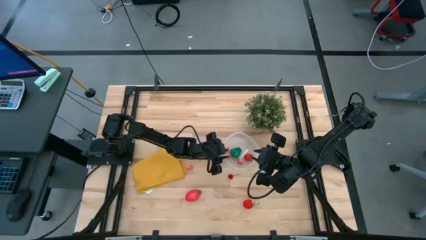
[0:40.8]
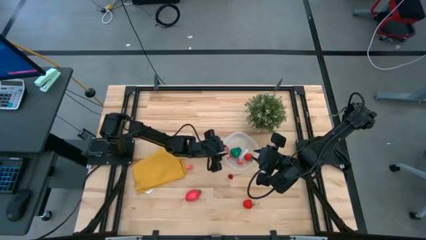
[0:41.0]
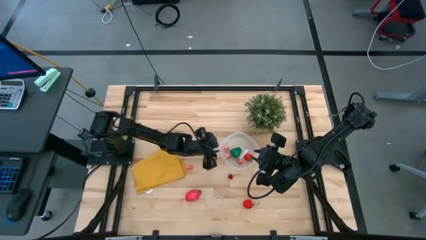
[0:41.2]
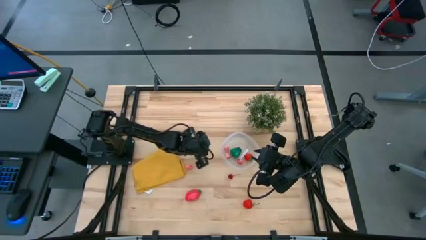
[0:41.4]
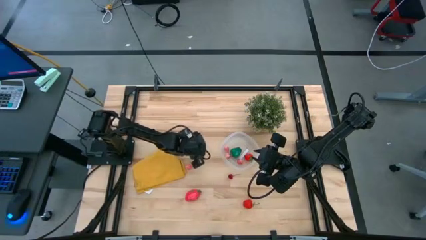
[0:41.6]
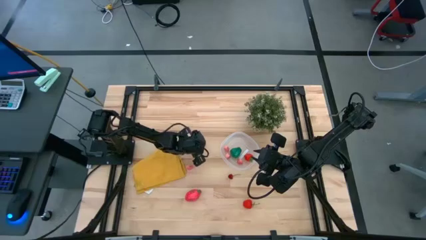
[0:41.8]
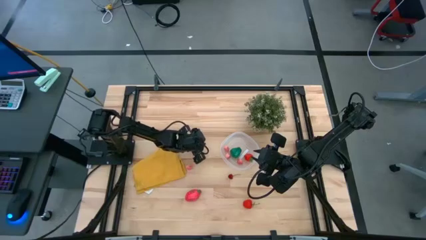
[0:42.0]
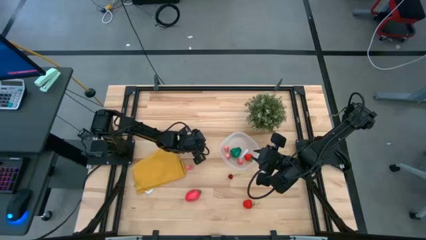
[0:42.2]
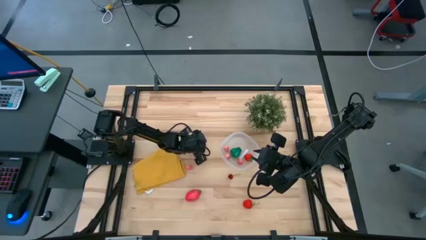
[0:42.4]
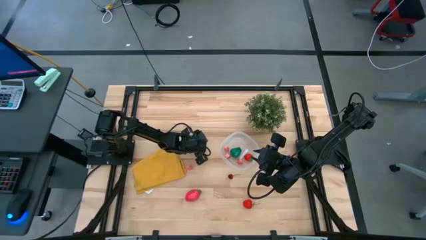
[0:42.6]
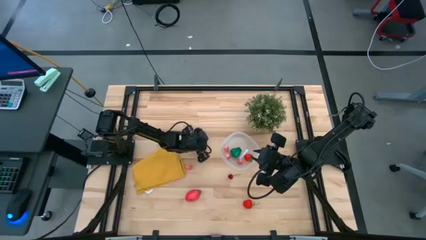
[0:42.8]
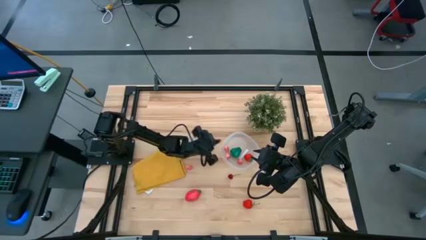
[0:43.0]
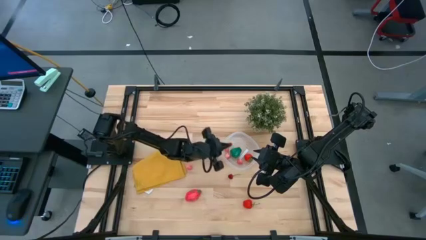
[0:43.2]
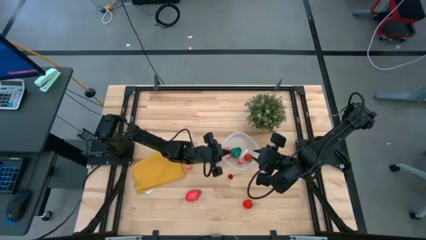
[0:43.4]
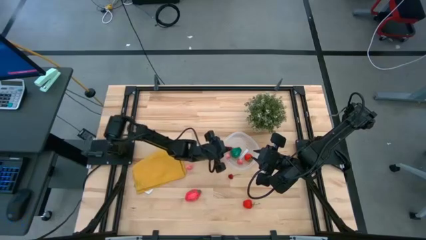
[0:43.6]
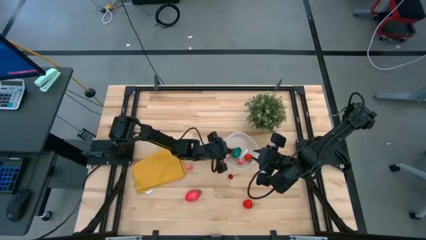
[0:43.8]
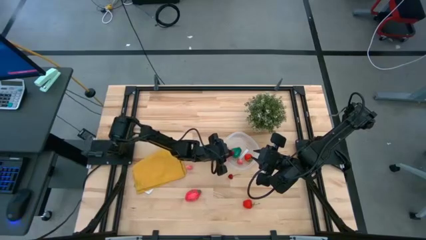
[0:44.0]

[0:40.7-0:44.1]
Task: Pick and placing Produce into tupperware
Put the cherry into the transparent bin

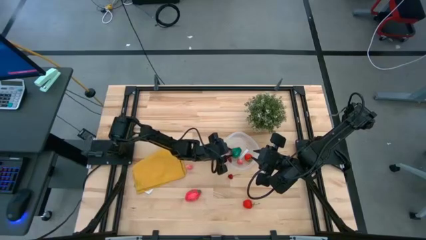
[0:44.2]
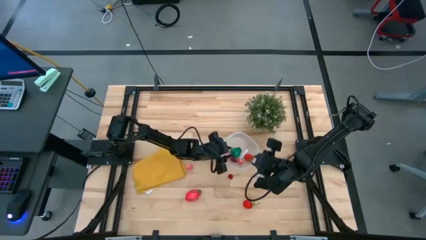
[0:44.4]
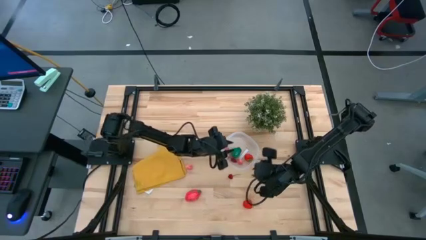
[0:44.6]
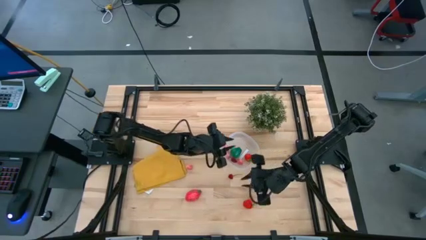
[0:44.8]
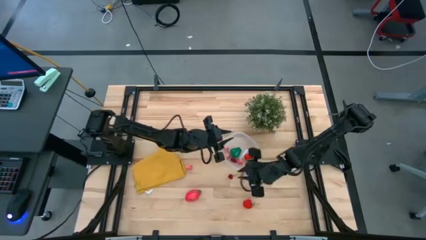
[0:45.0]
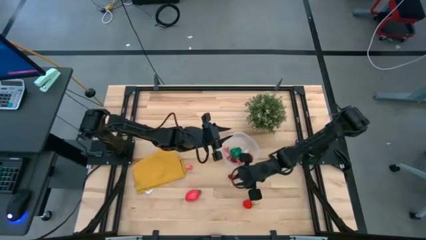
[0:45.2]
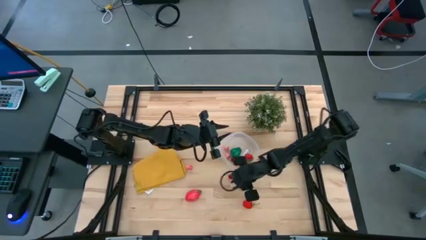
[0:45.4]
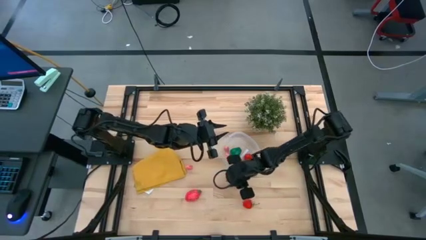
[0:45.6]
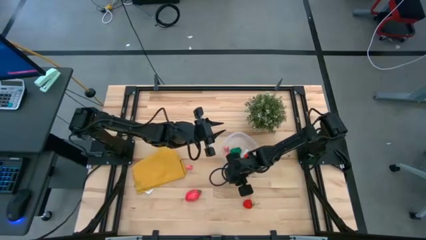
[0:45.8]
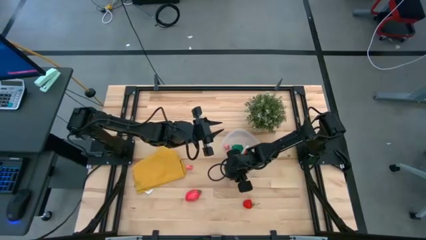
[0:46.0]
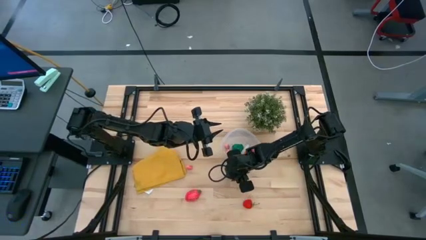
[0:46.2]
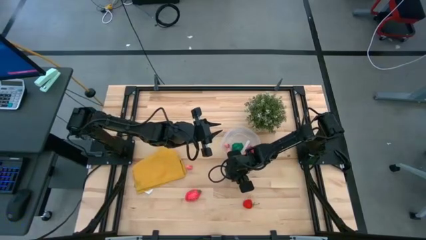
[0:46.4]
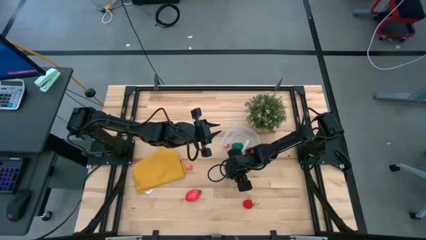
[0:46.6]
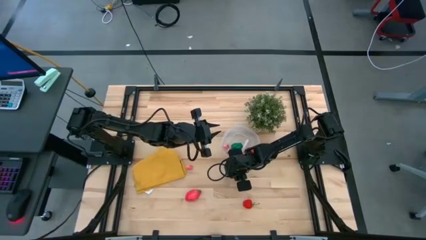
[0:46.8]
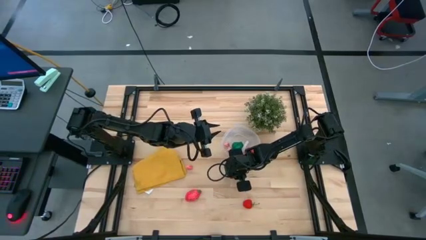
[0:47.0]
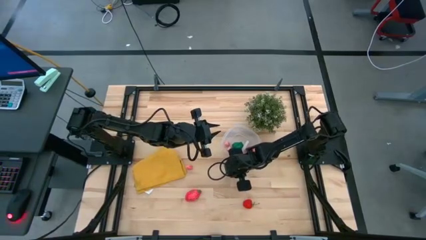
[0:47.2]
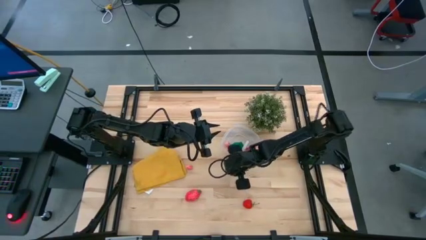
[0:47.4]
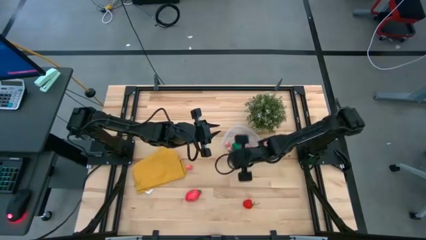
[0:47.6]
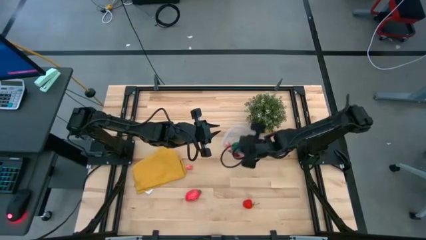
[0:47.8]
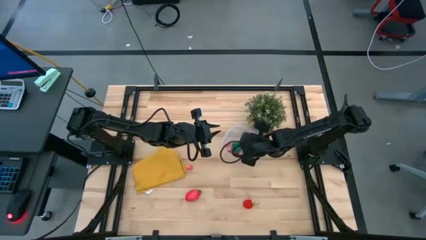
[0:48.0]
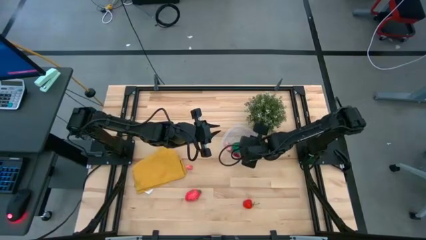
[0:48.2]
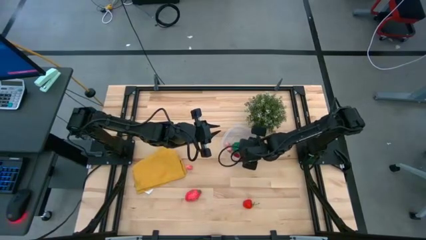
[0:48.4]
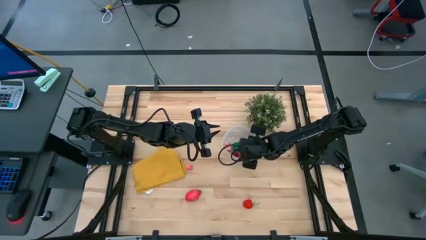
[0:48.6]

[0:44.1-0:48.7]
Put the cherry into the transparent bin

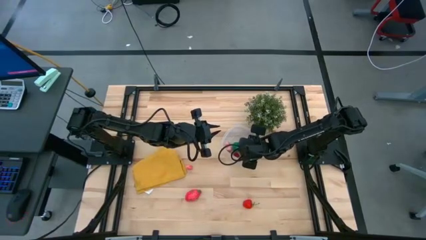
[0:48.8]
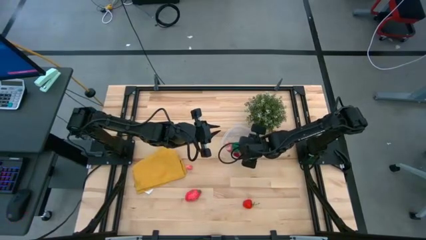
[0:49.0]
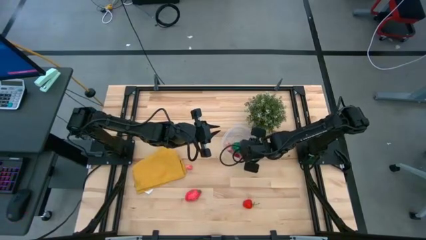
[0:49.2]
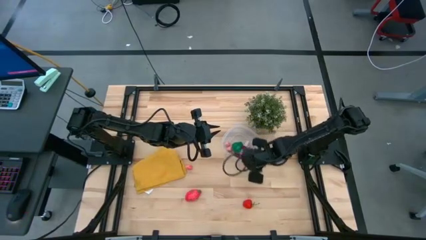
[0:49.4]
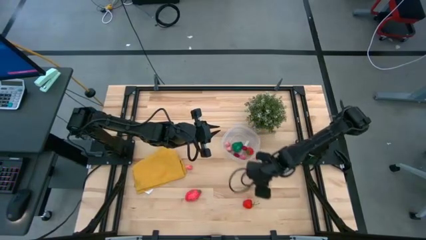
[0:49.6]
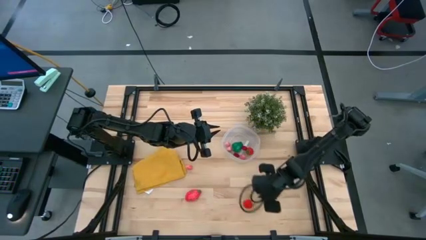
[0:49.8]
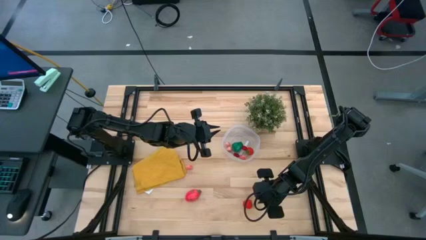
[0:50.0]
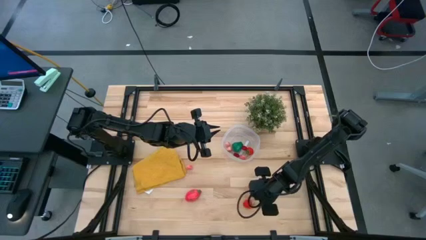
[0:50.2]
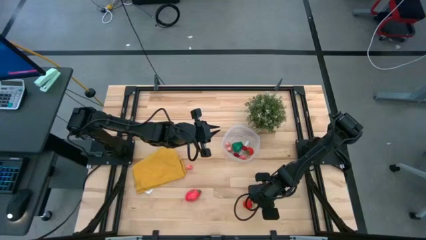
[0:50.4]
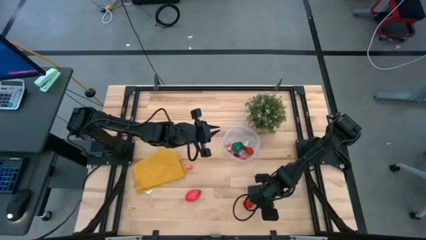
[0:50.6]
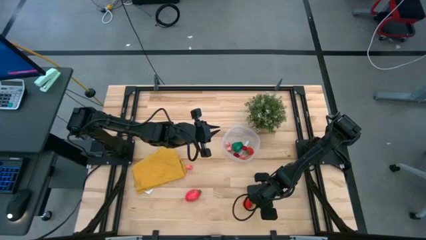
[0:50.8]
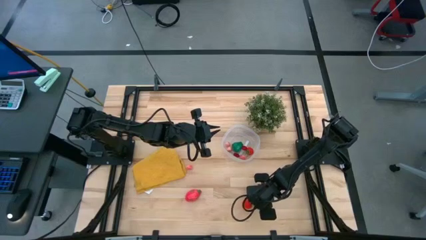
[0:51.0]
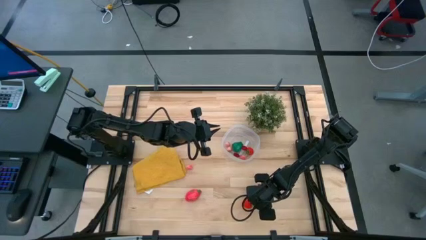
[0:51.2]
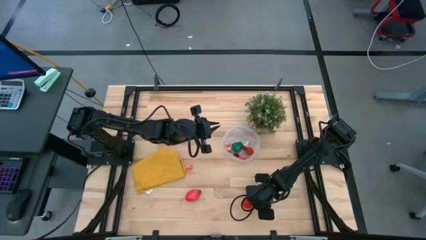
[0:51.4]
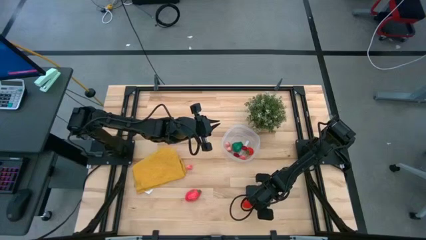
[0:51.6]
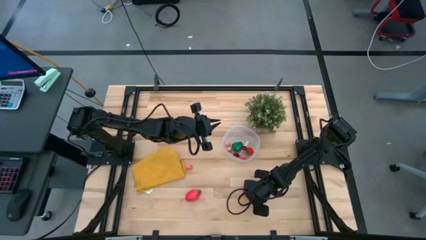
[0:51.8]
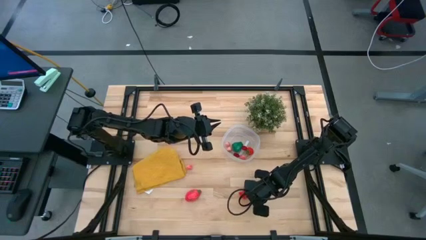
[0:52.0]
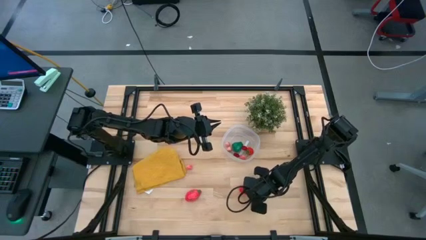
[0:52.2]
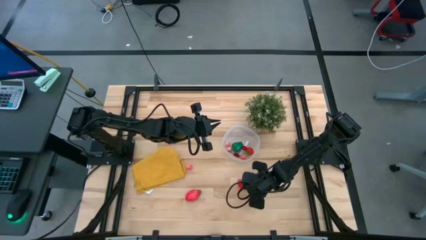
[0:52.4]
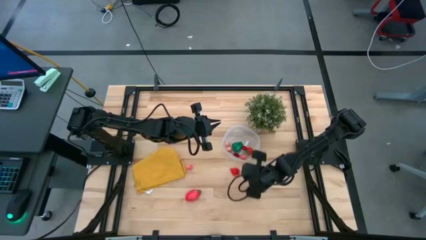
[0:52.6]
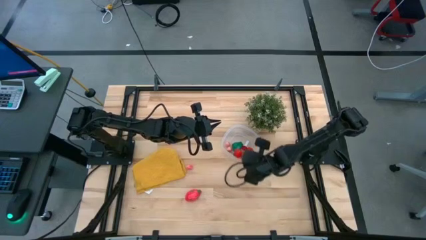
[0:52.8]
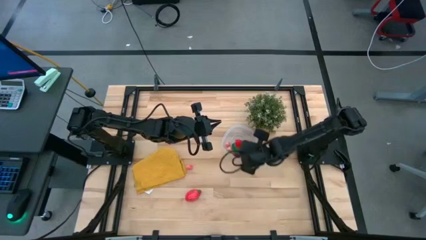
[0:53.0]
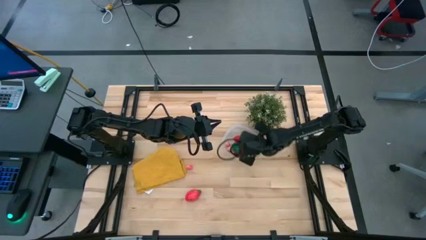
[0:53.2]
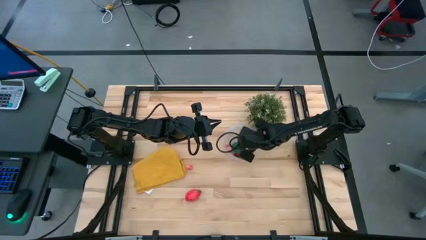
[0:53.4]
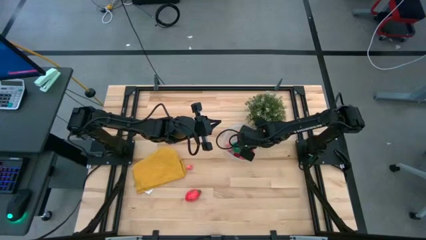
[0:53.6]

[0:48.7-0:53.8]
Put the strawberry into the transparent bin

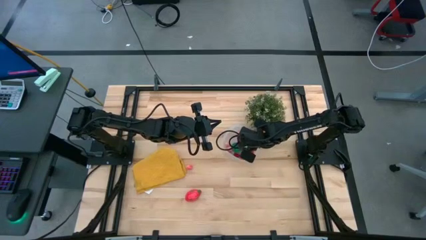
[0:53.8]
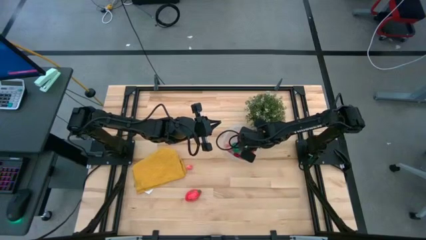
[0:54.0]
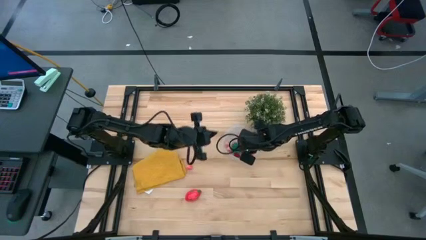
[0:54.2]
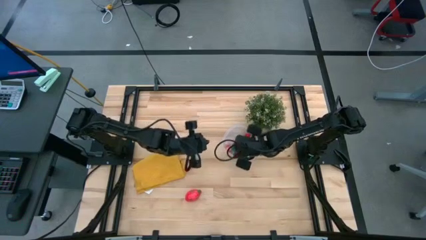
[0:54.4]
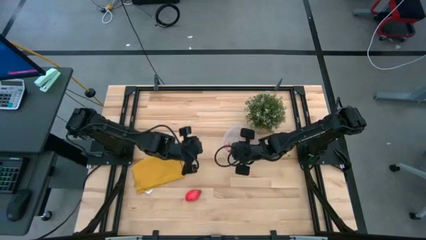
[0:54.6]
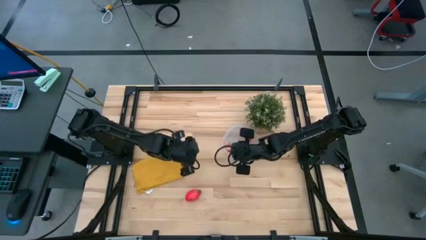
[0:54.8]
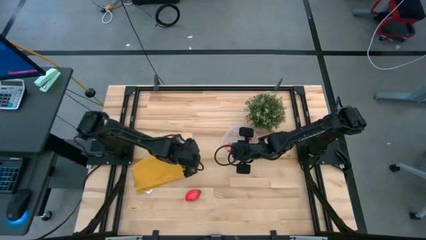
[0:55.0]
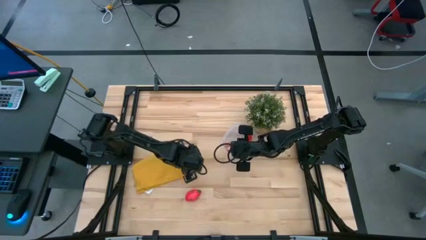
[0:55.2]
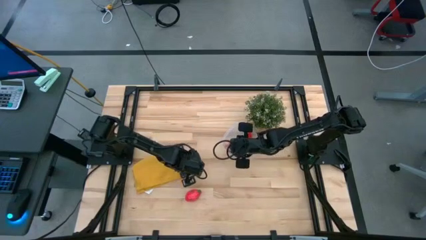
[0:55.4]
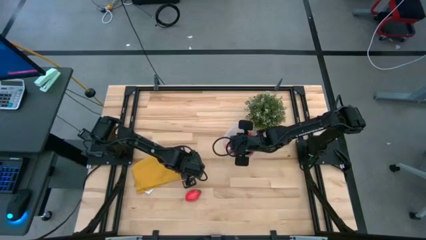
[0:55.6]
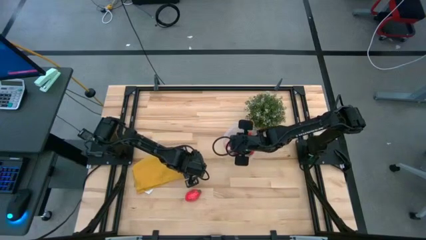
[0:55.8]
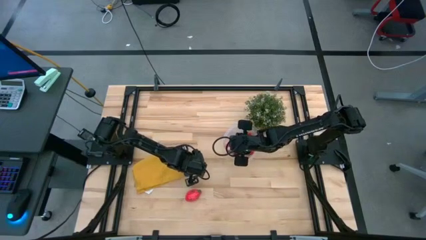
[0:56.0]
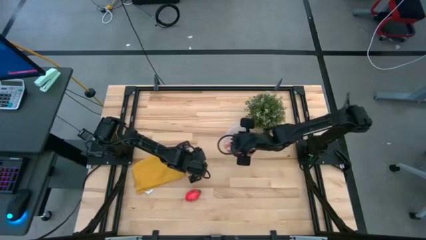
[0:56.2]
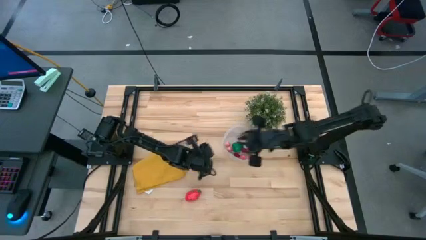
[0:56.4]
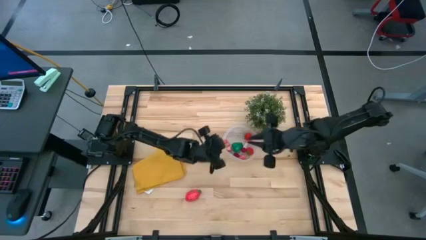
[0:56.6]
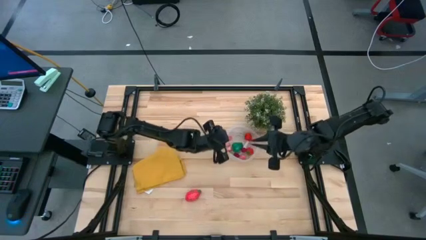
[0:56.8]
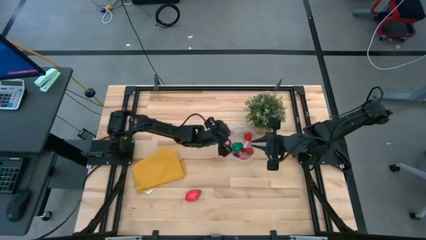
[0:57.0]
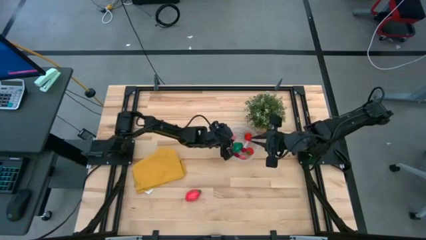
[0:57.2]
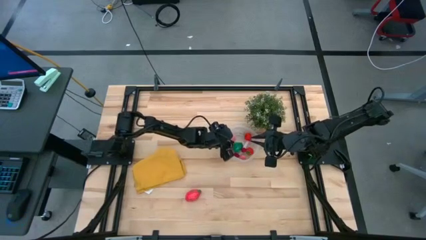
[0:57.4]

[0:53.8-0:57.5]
Put the peach into the transparent bin
